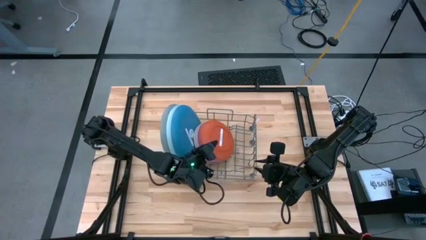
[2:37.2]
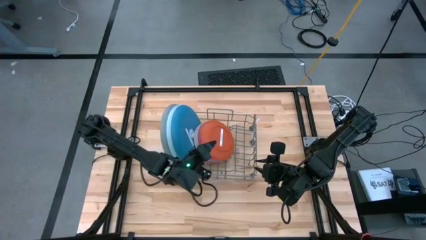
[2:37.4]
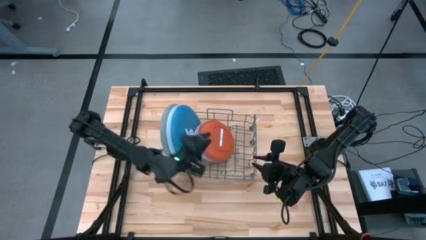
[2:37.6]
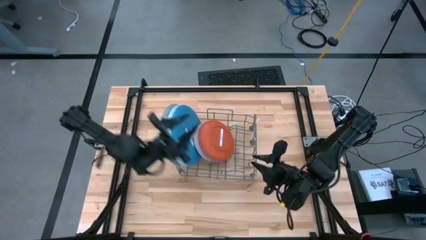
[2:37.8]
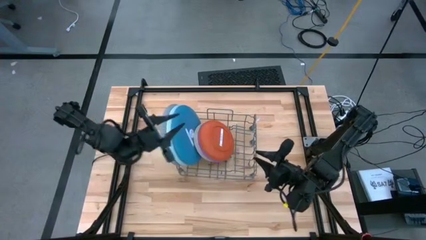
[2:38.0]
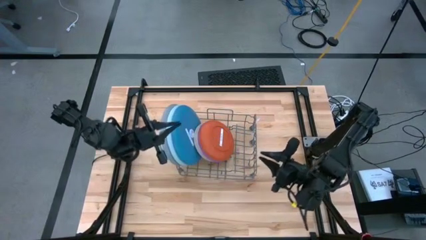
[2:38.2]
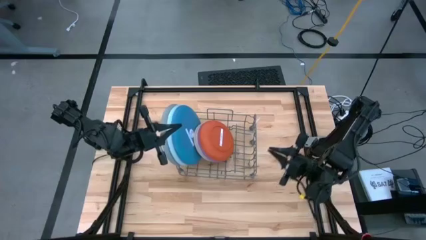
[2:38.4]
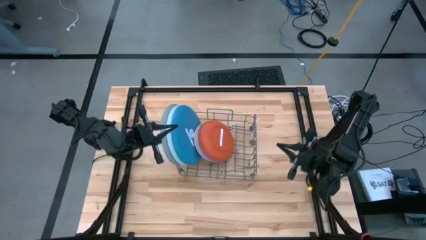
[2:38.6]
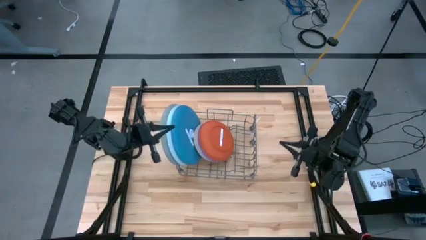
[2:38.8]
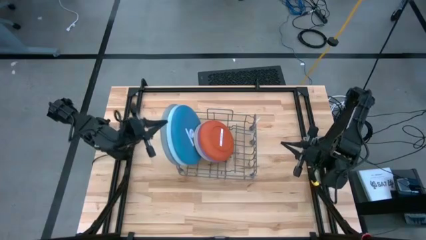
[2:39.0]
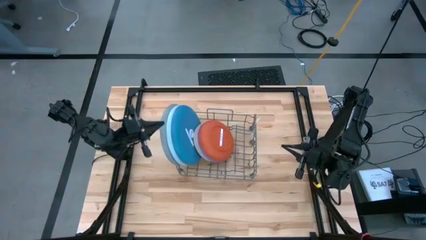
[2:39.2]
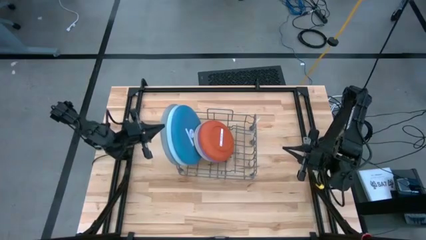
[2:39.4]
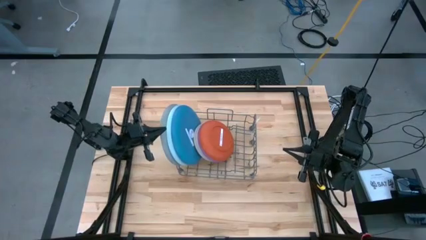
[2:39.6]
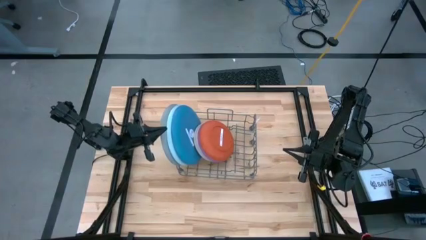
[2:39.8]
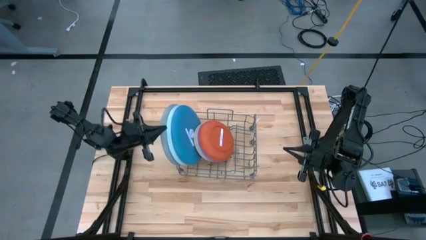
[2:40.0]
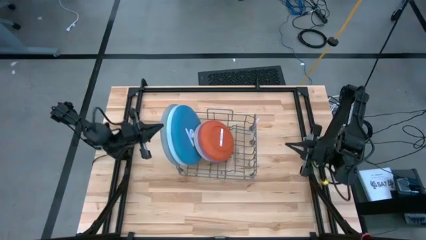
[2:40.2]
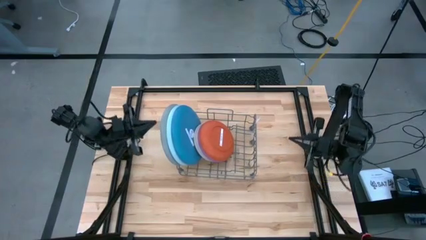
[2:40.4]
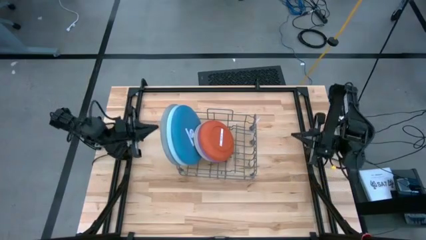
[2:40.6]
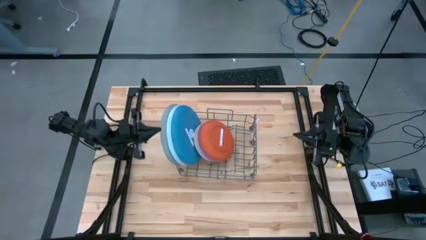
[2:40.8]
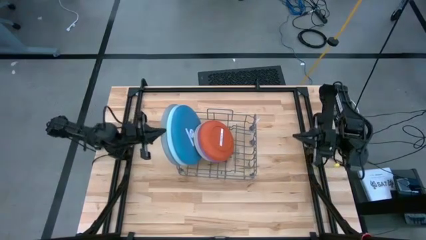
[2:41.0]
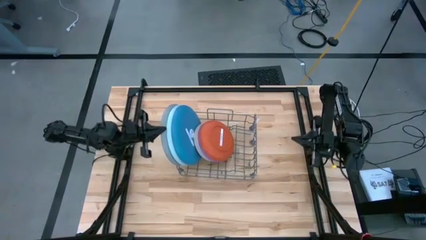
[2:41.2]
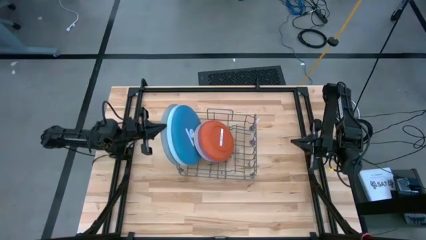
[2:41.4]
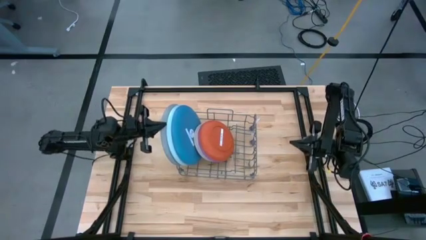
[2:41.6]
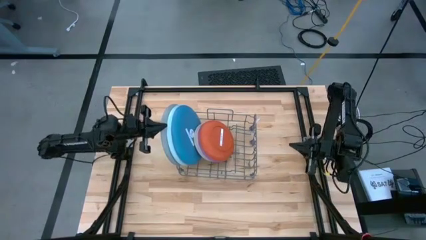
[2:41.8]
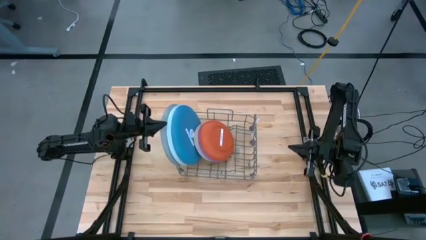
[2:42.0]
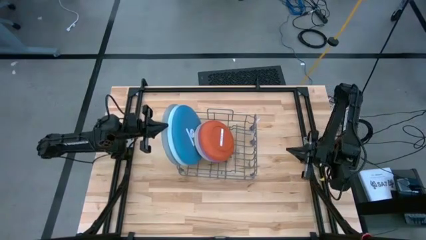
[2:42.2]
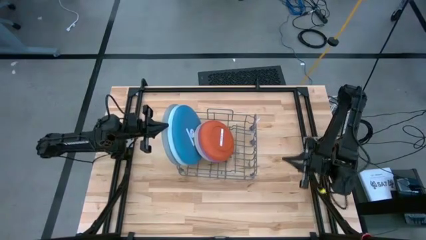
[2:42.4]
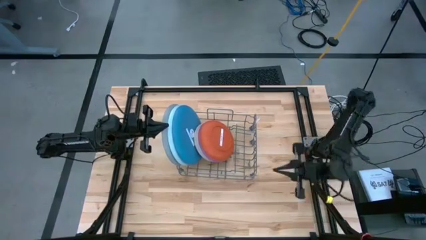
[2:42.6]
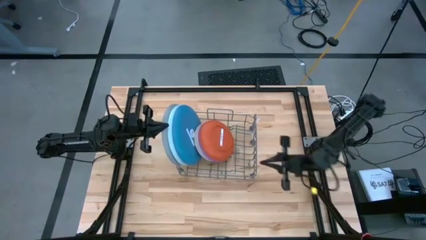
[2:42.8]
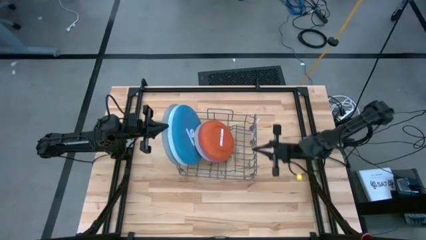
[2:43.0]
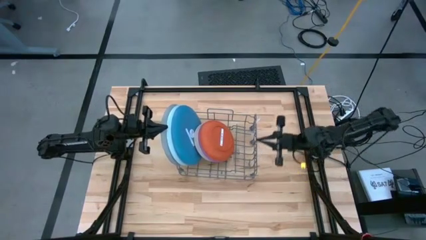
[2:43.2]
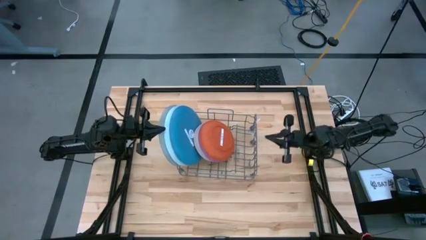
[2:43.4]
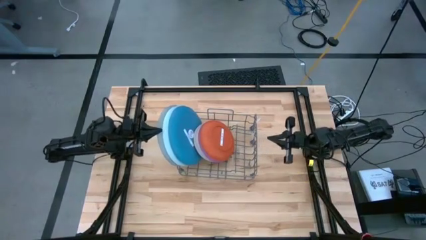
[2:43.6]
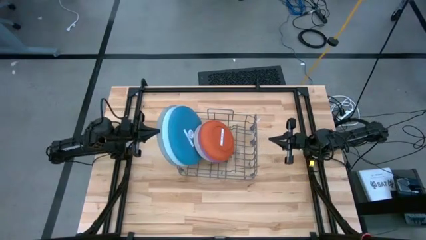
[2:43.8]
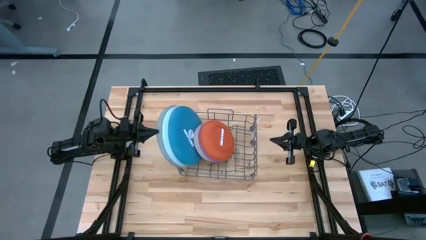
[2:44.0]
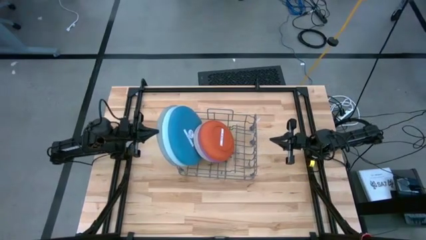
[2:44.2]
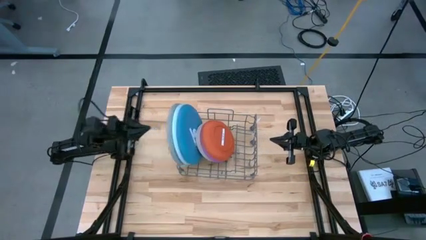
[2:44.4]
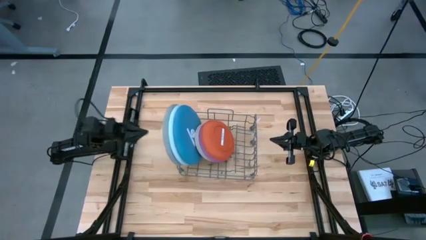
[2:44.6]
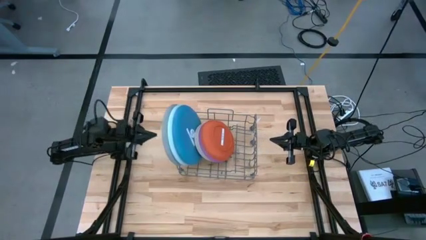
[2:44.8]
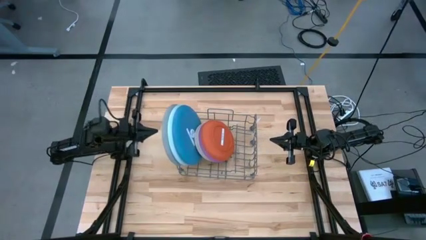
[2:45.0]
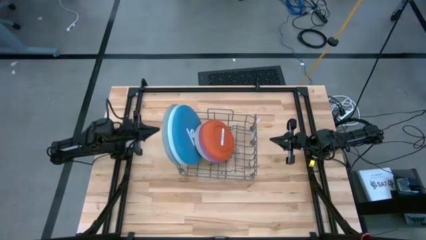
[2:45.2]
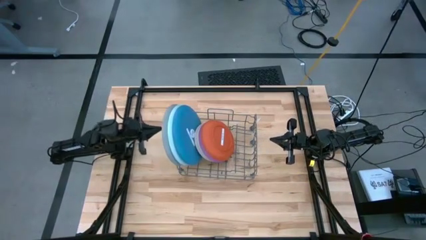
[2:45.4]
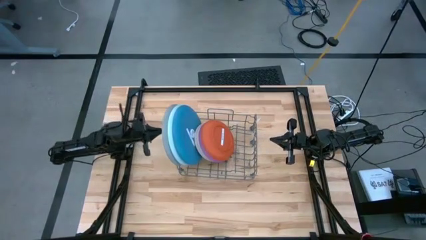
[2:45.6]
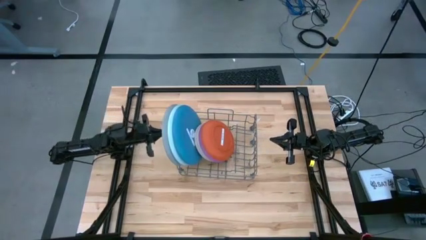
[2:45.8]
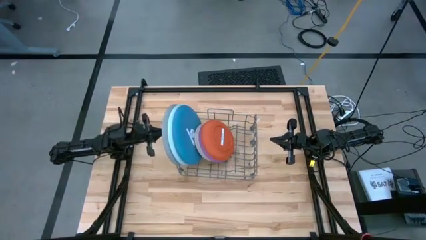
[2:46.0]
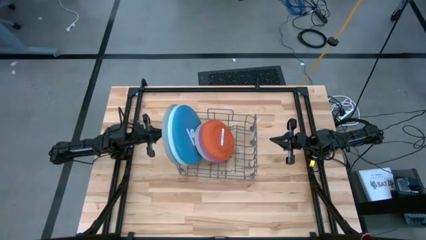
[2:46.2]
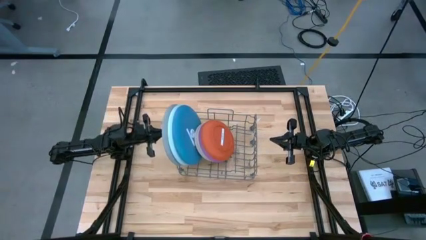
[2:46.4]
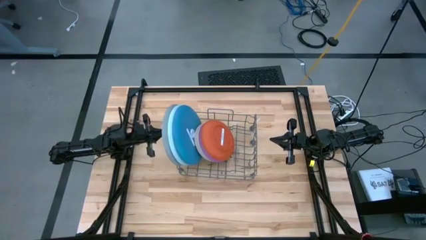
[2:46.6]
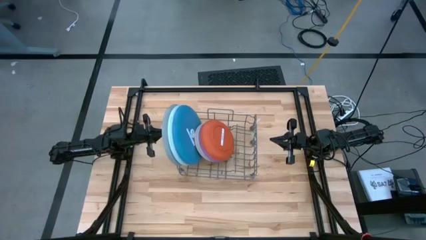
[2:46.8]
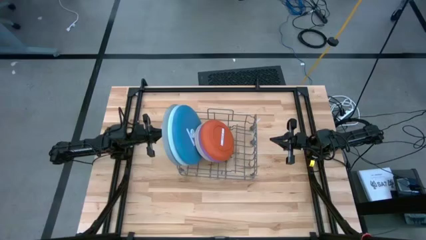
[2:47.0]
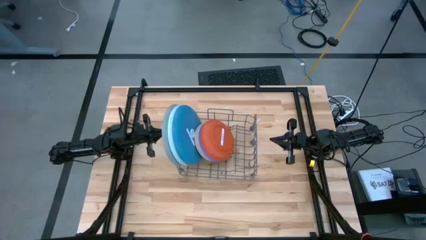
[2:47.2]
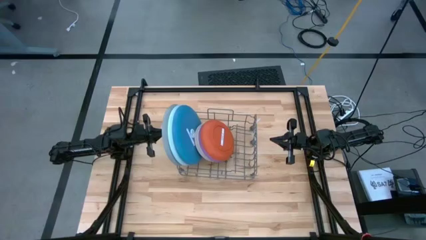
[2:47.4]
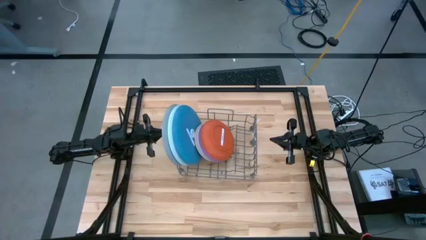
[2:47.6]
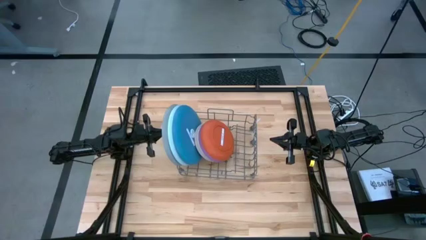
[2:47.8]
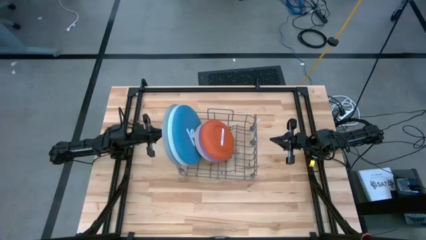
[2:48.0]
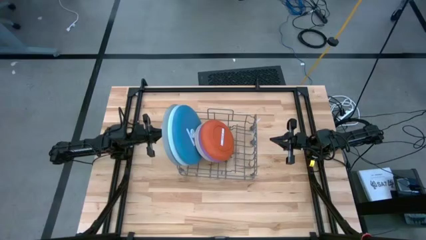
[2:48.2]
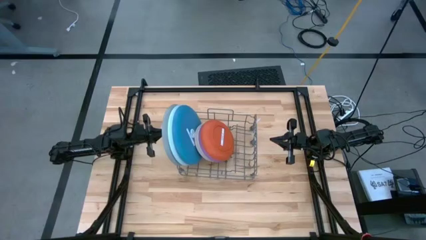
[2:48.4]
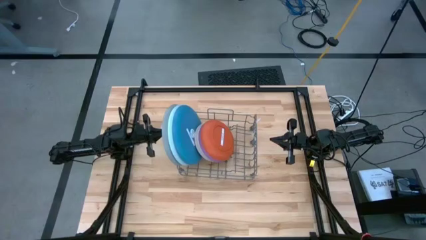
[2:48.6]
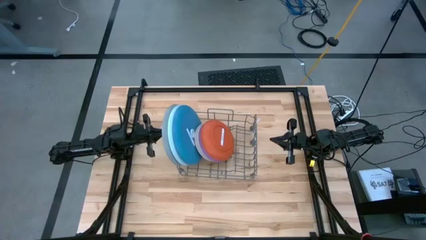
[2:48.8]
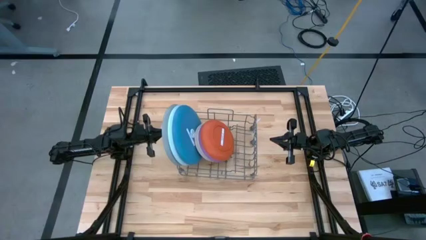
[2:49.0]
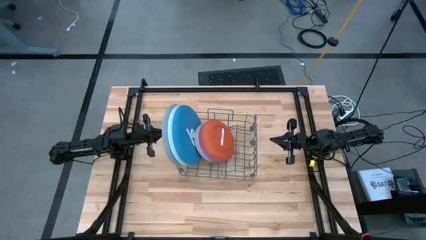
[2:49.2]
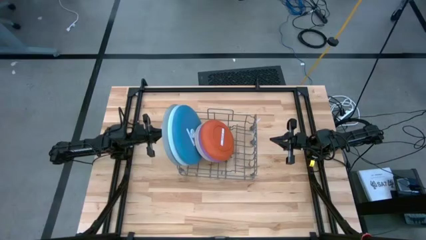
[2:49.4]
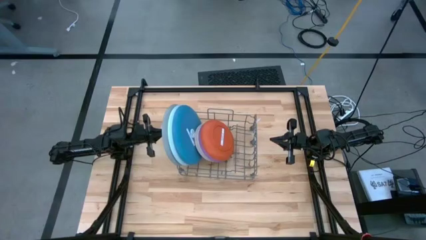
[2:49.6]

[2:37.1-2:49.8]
Task: Sort dishes
Return to Home Position
